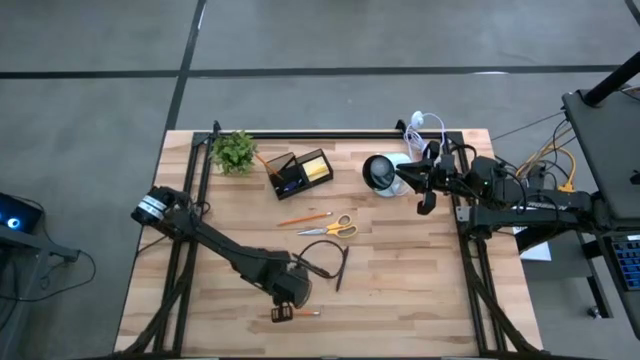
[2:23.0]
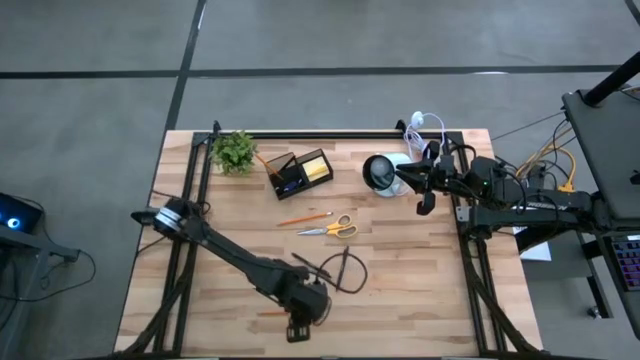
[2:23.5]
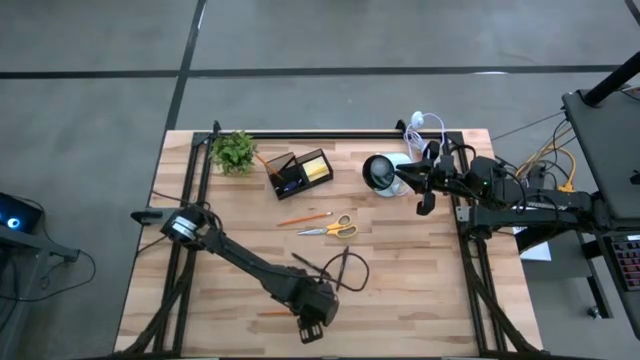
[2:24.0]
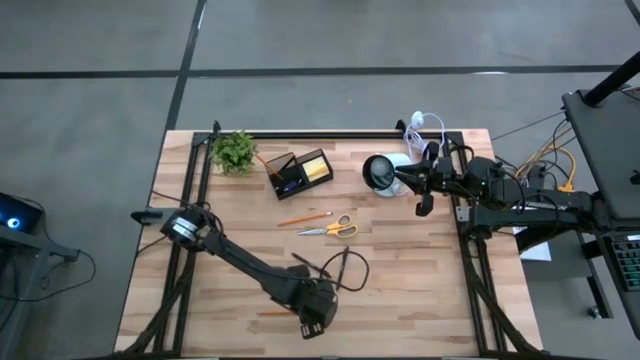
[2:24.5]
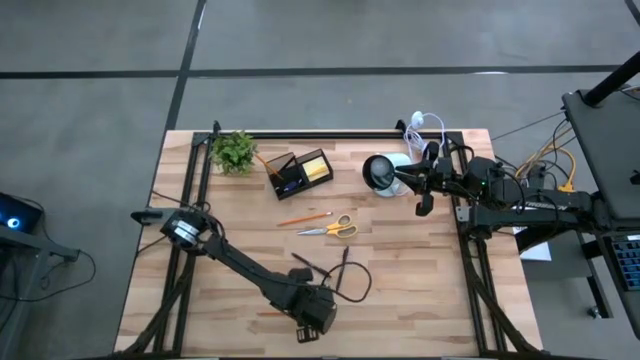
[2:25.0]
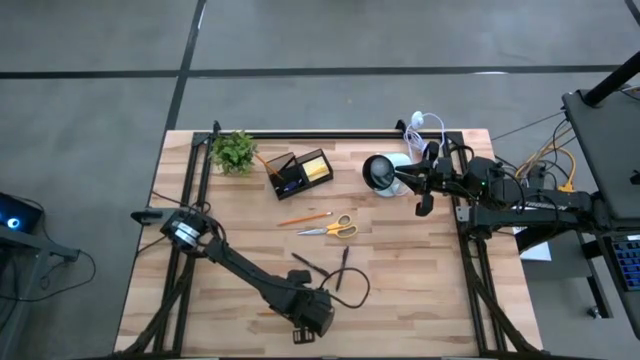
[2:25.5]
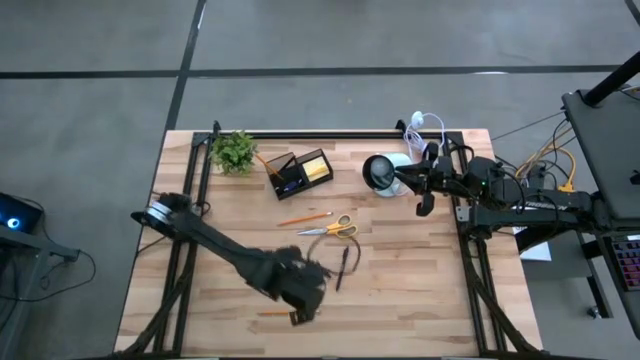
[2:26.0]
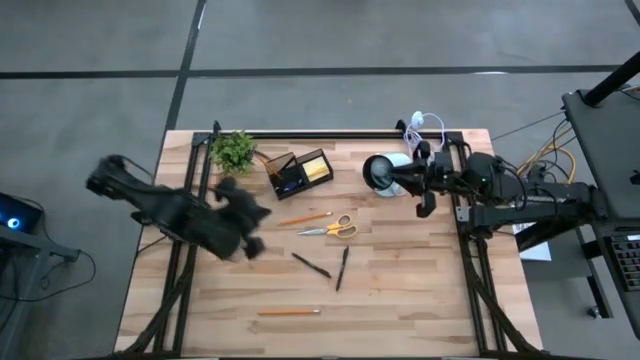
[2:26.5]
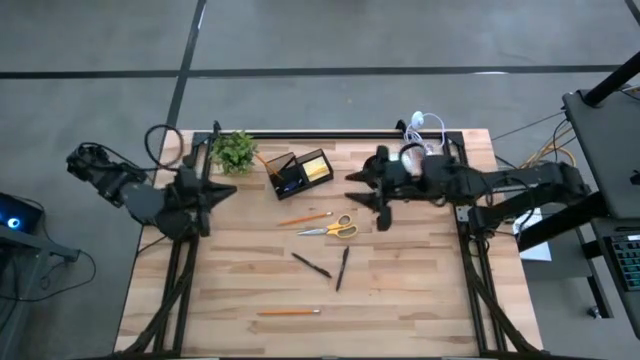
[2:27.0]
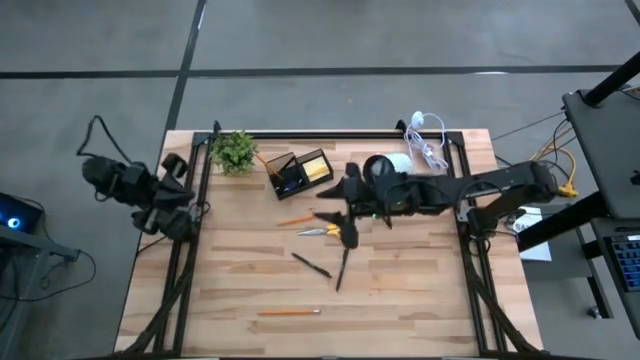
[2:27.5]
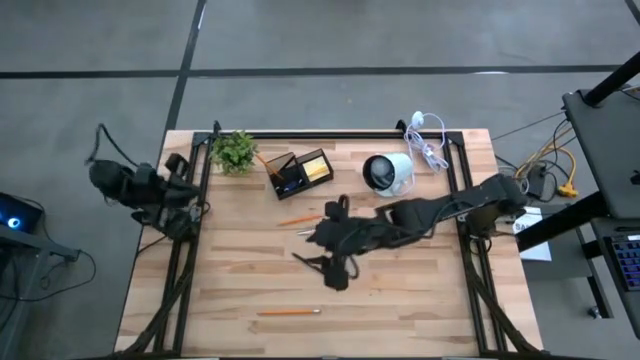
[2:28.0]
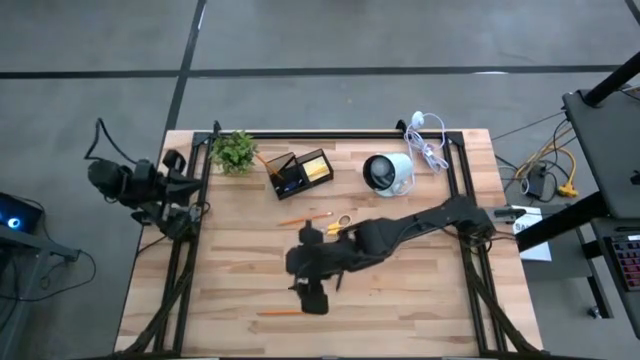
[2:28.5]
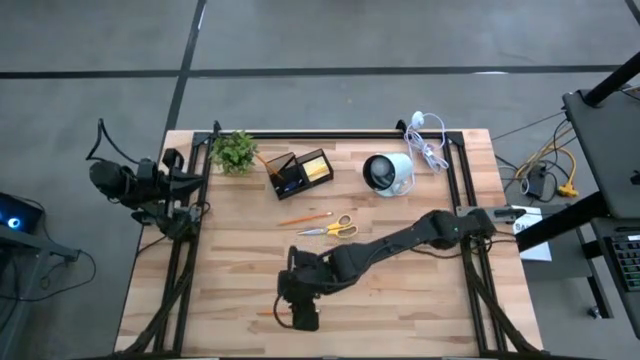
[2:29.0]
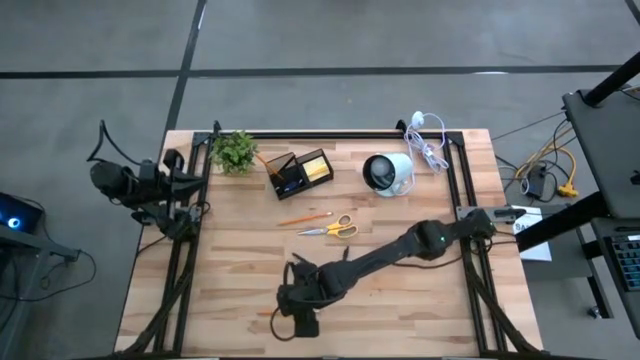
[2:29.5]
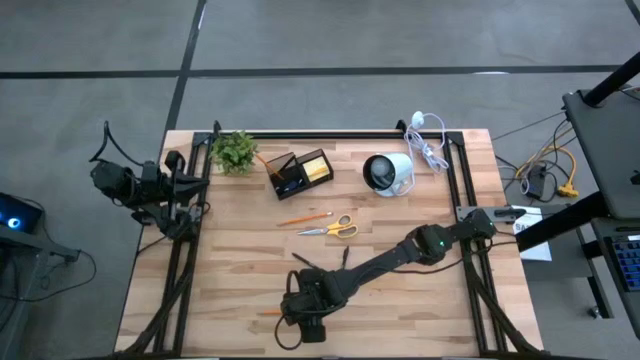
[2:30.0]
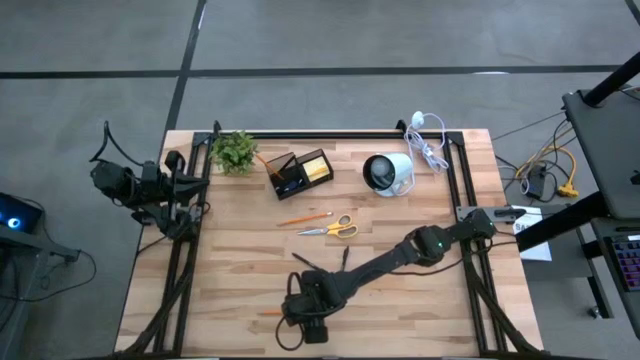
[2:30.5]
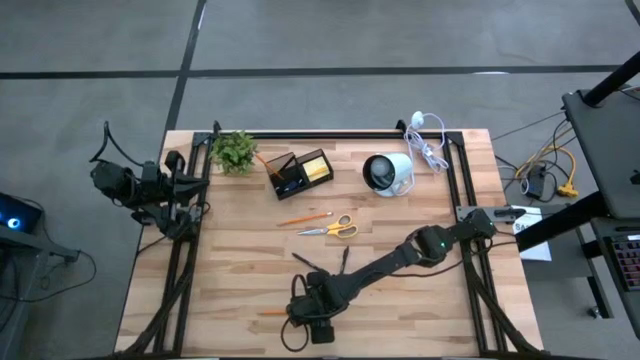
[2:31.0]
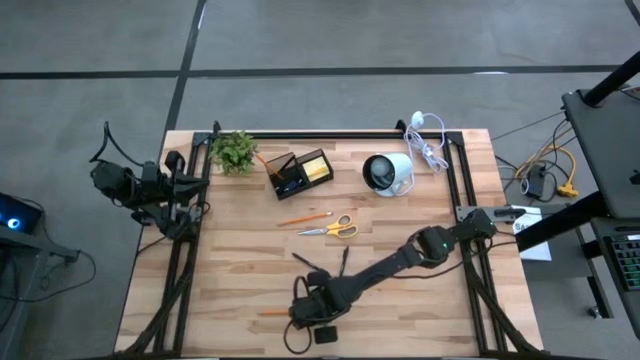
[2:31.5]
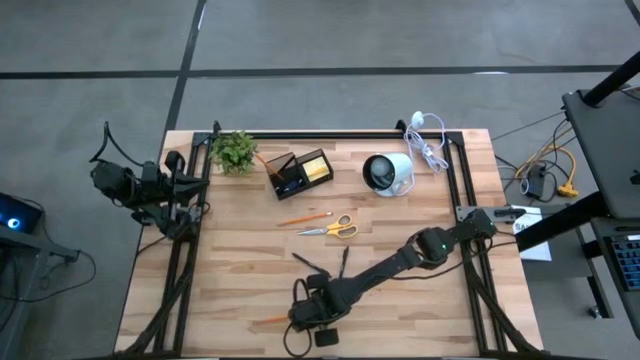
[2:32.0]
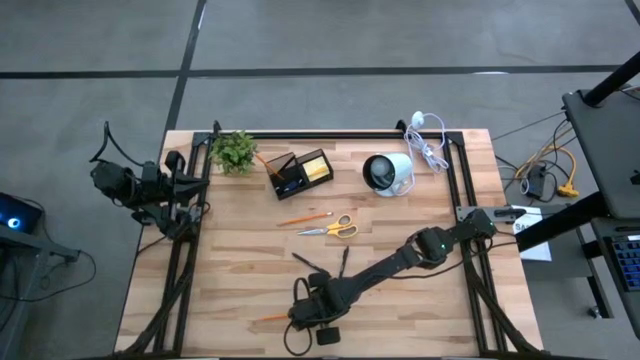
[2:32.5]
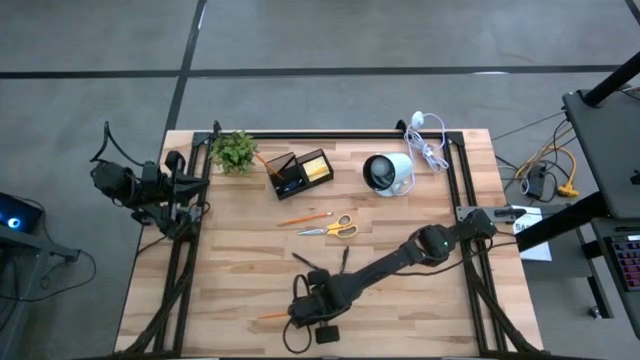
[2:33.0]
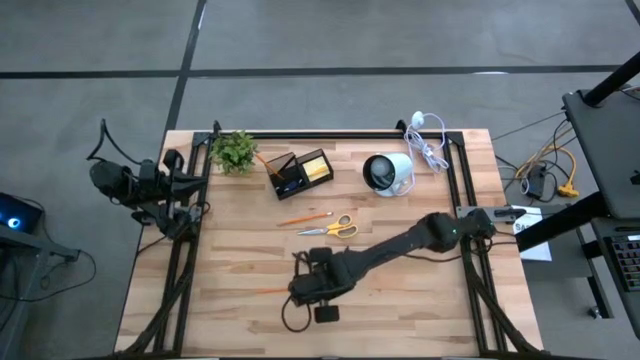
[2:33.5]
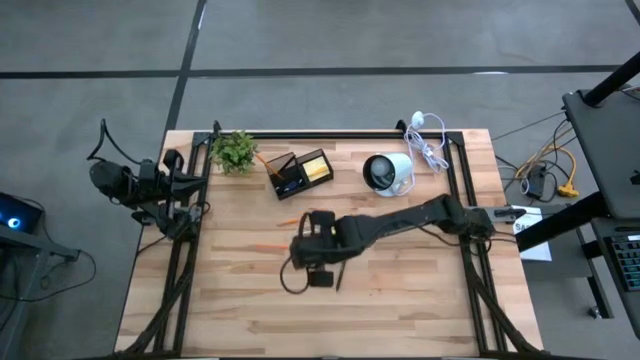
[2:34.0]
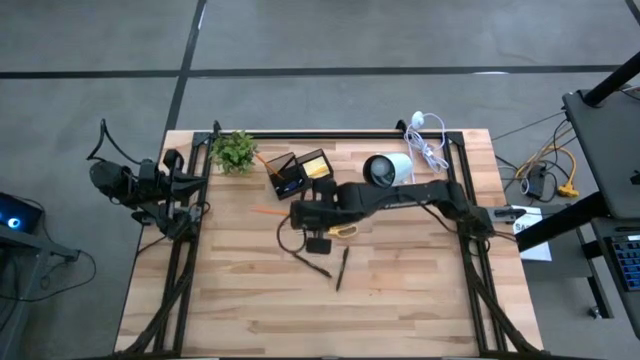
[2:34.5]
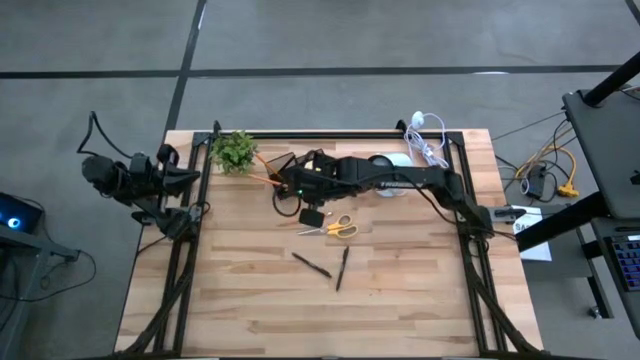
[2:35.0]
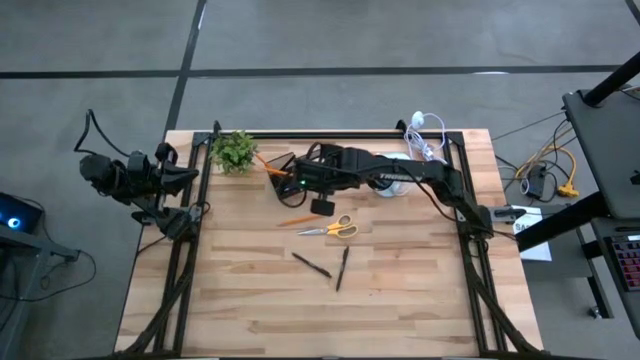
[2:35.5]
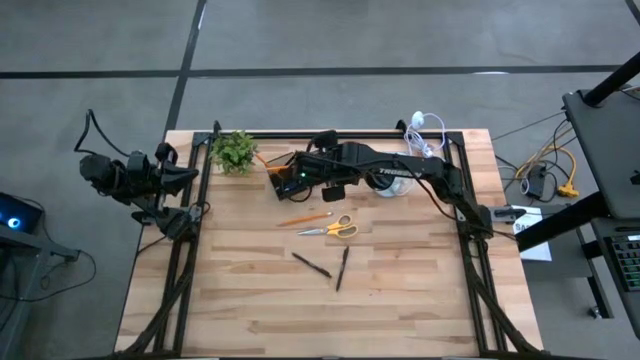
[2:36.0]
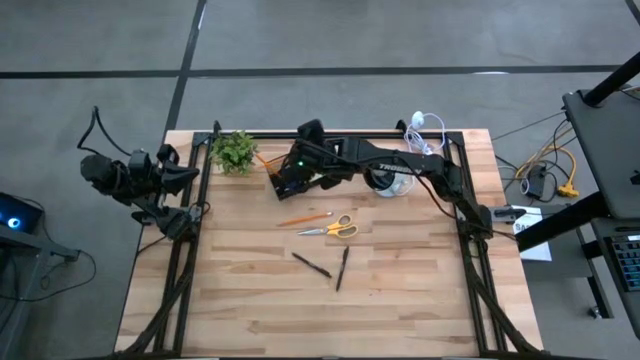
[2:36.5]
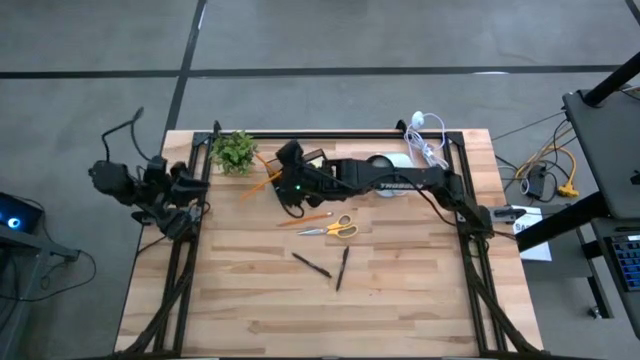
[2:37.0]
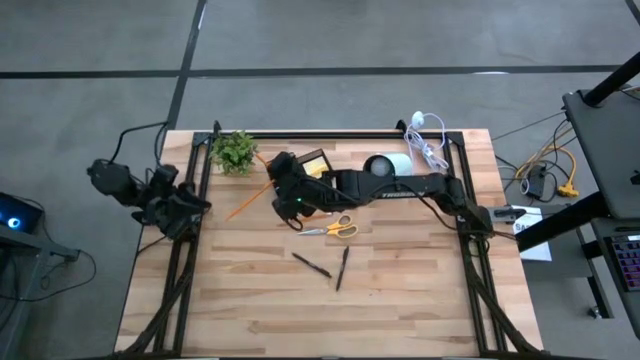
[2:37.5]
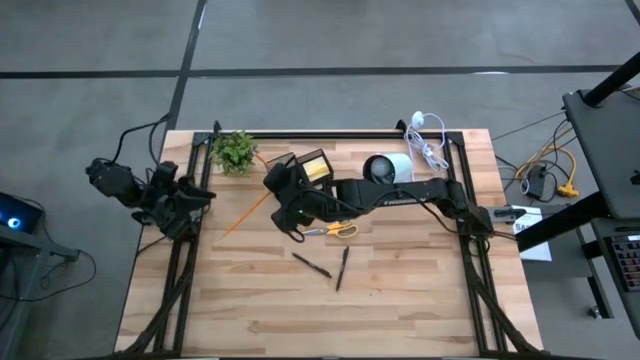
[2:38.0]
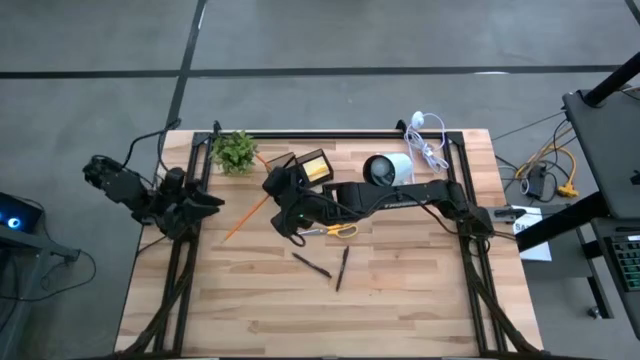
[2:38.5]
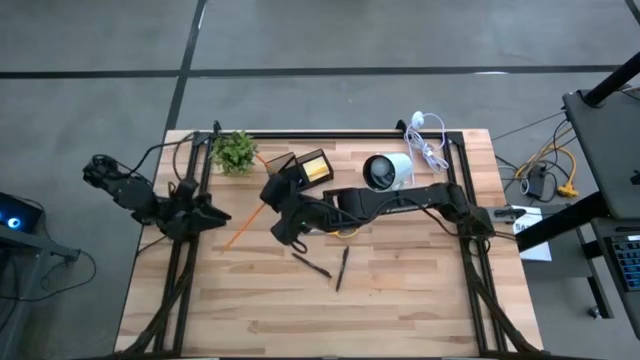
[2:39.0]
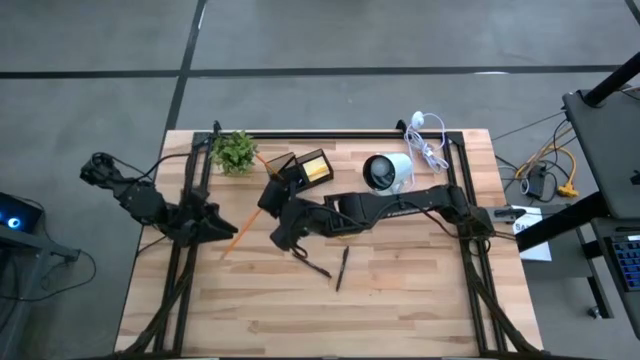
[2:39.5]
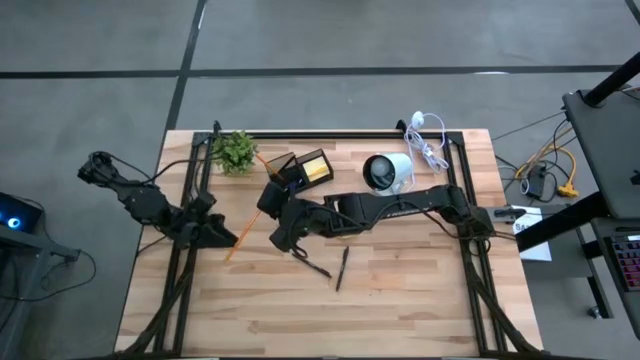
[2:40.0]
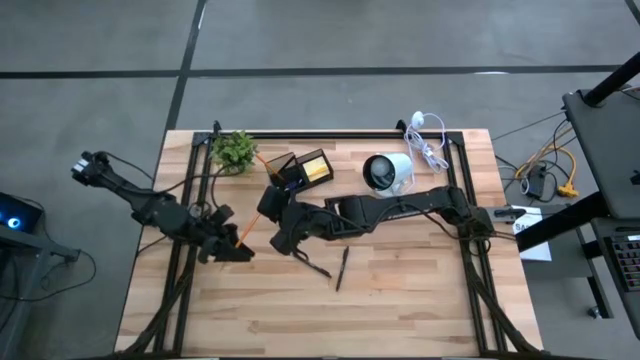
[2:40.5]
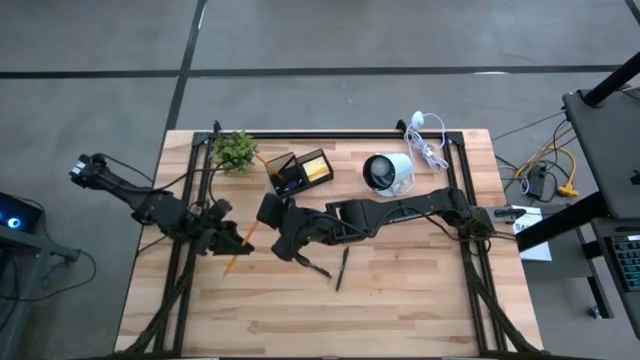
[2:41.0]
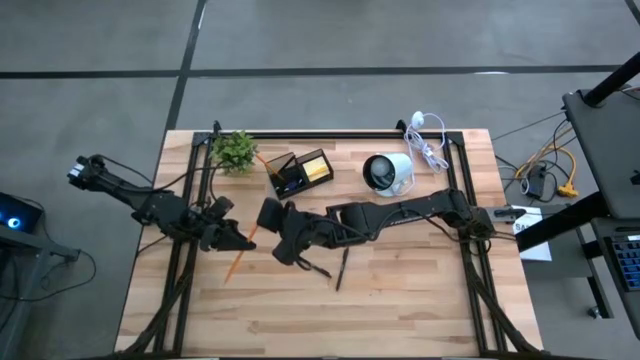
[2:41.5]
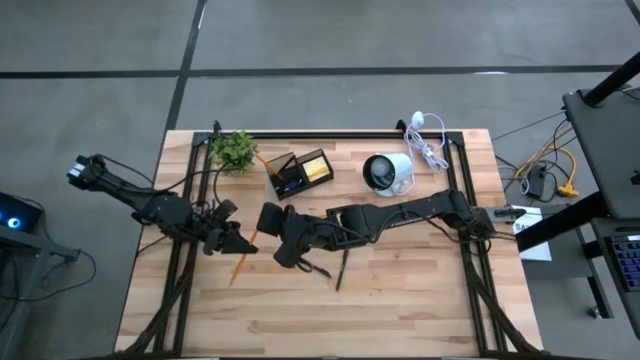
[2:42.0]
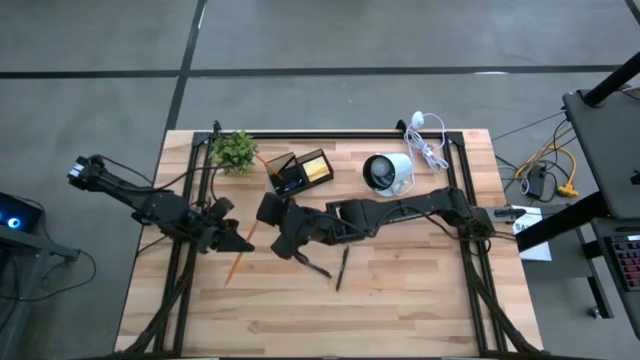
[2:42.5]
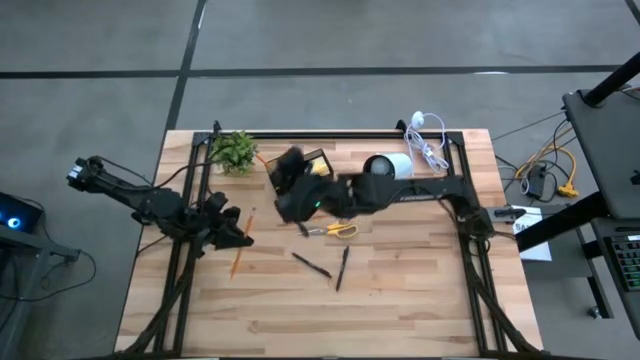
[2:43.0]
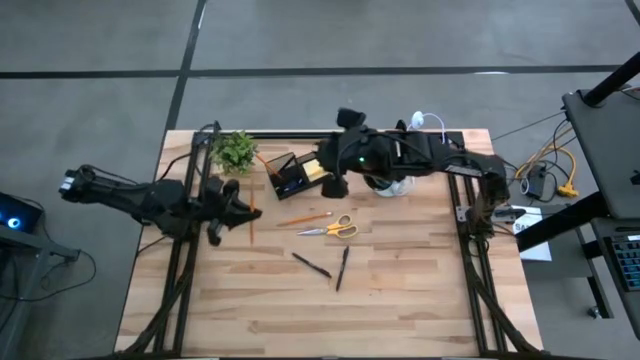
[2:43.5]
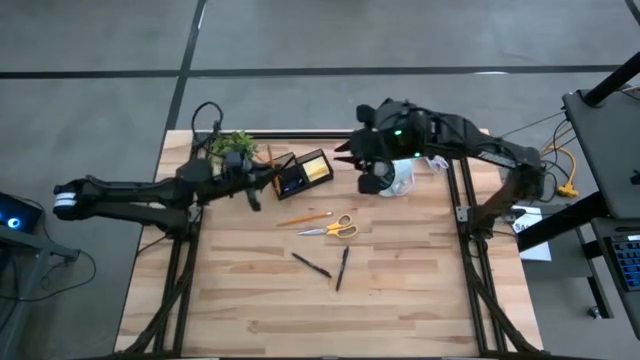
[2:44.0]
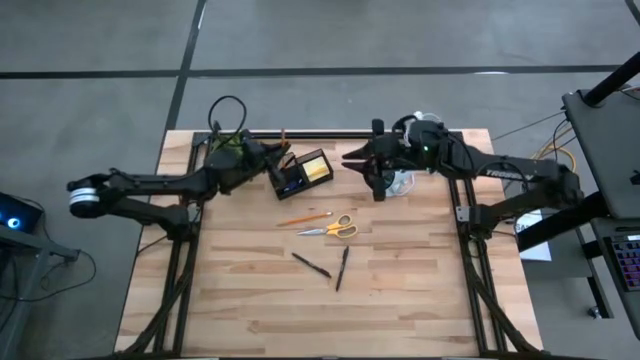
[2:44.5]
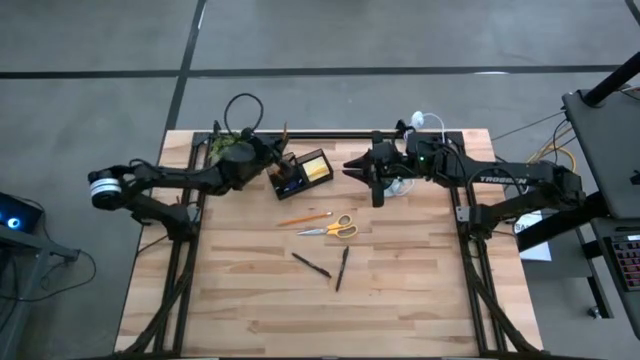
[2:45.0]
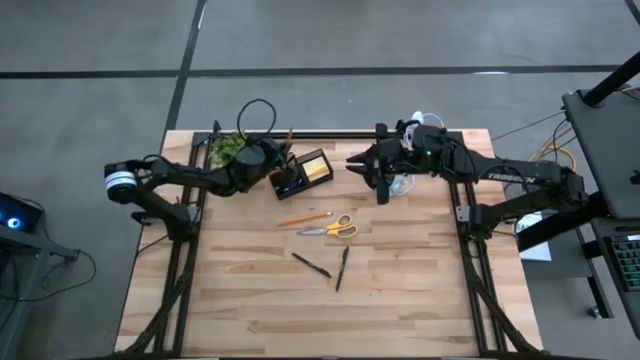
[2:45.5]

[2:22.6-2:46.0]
Task: Pick and place office supplies into organizer
Put the bottom yellow pencil into the black desk organizer
